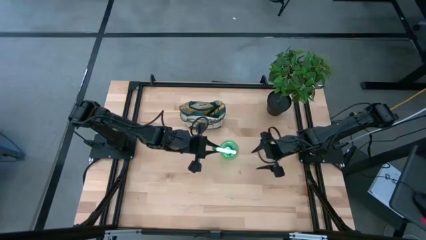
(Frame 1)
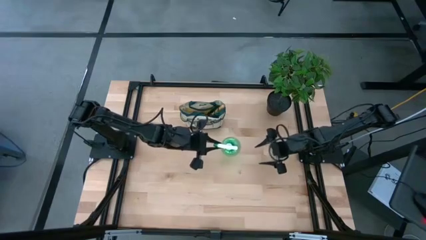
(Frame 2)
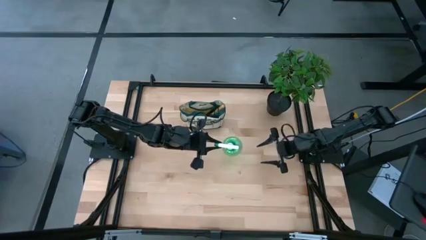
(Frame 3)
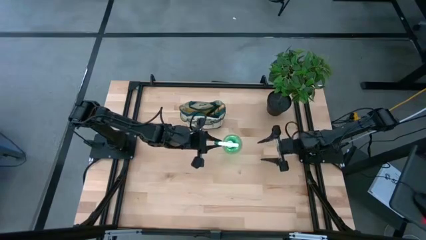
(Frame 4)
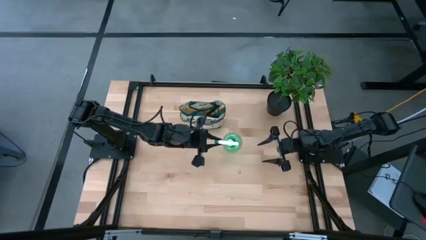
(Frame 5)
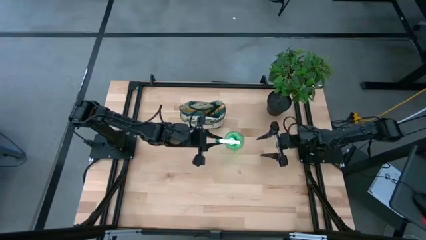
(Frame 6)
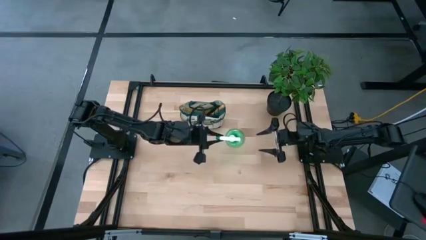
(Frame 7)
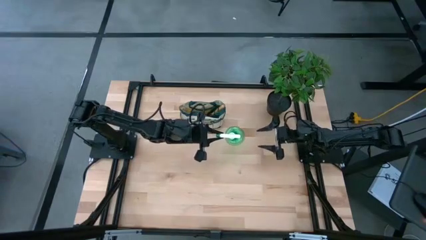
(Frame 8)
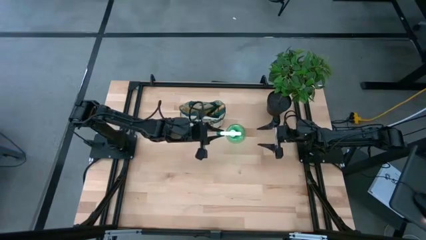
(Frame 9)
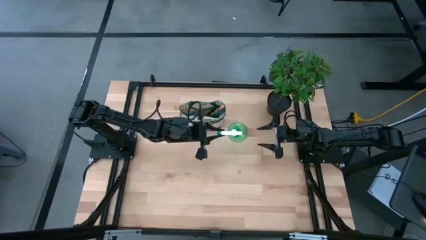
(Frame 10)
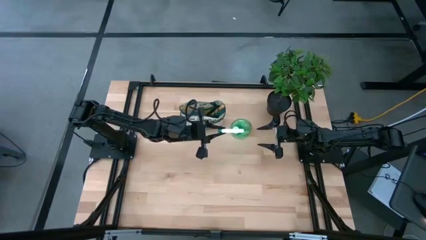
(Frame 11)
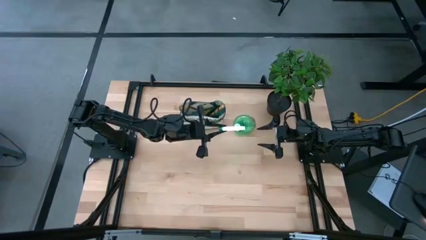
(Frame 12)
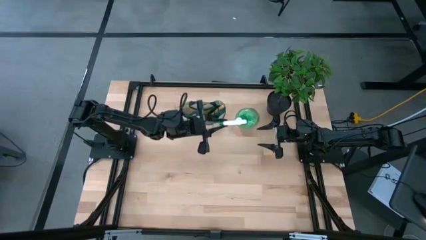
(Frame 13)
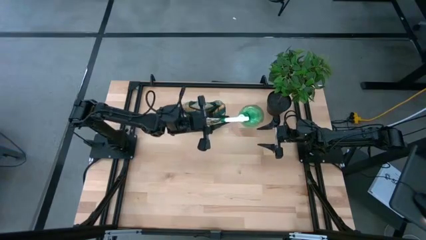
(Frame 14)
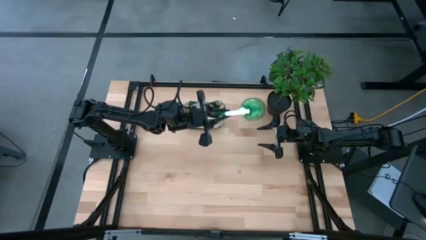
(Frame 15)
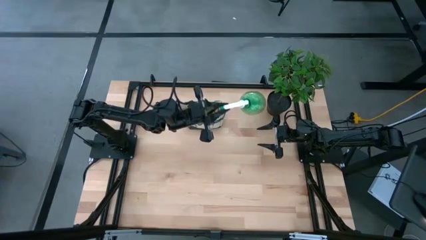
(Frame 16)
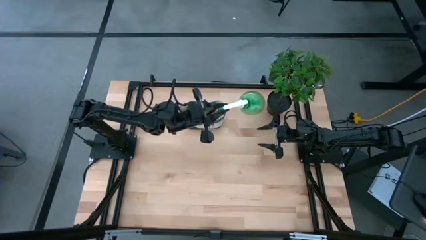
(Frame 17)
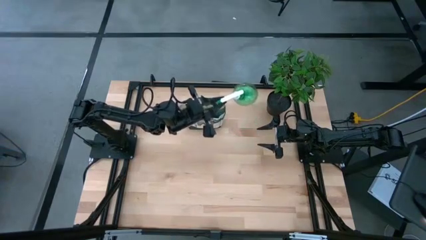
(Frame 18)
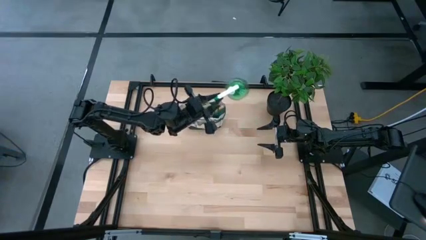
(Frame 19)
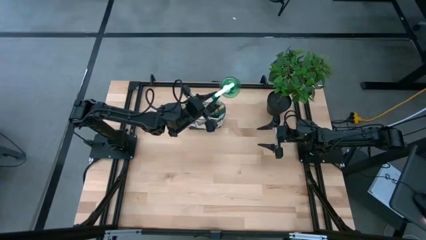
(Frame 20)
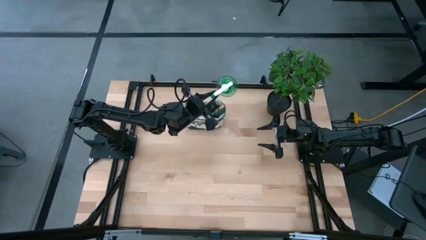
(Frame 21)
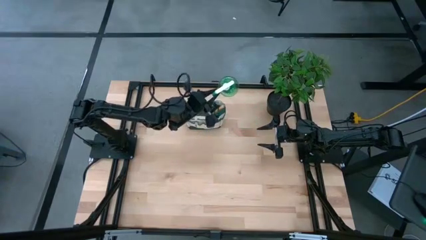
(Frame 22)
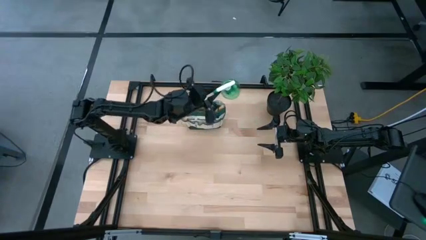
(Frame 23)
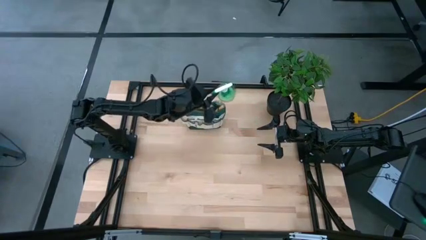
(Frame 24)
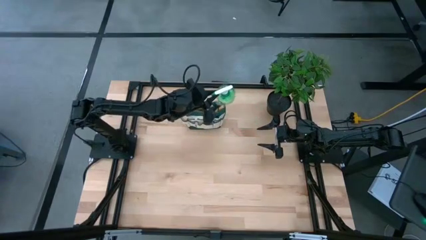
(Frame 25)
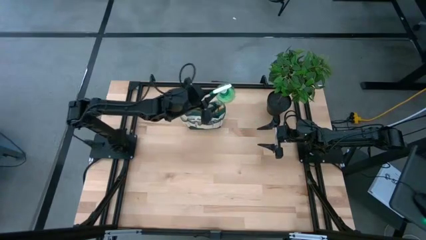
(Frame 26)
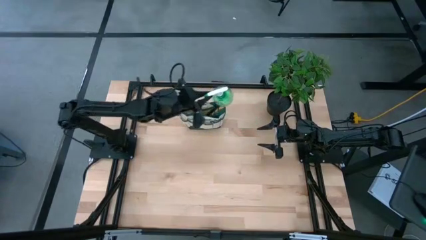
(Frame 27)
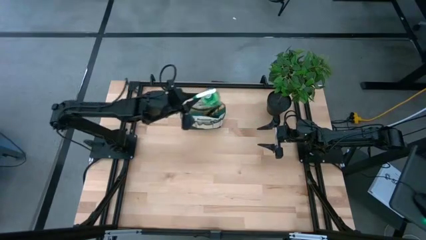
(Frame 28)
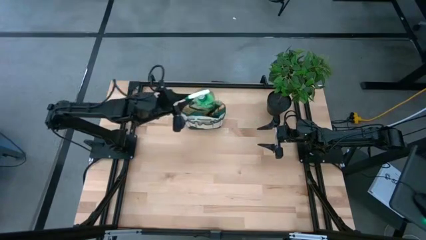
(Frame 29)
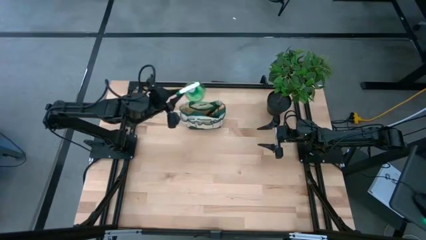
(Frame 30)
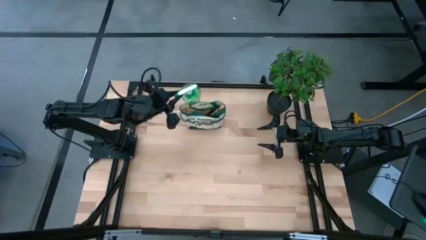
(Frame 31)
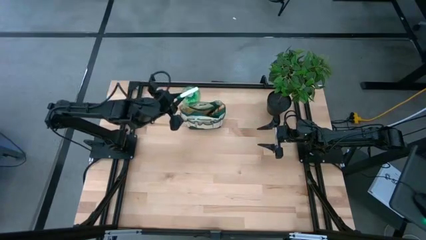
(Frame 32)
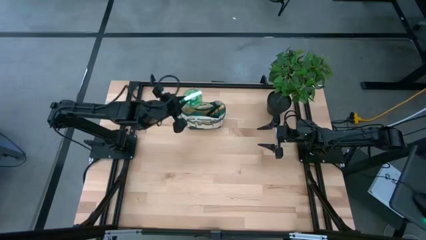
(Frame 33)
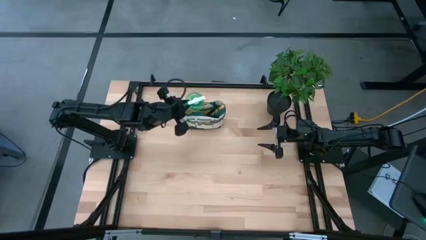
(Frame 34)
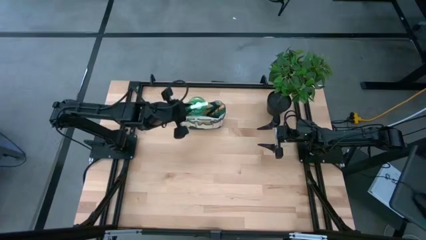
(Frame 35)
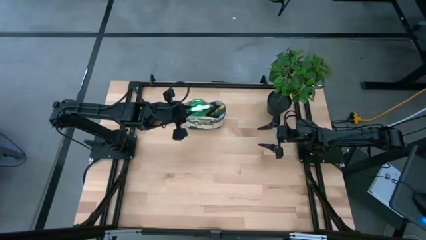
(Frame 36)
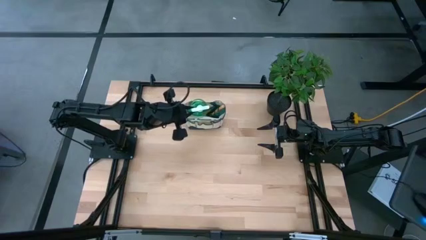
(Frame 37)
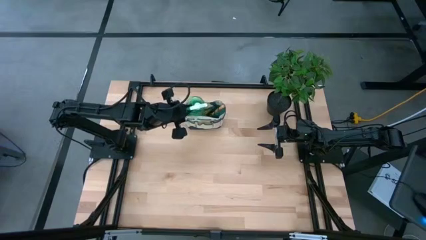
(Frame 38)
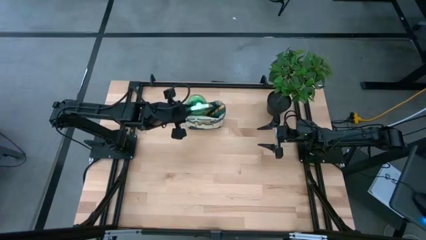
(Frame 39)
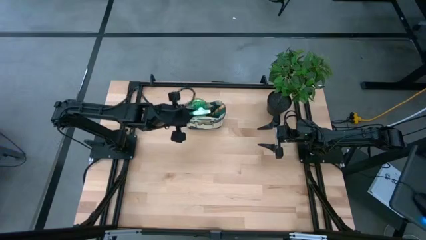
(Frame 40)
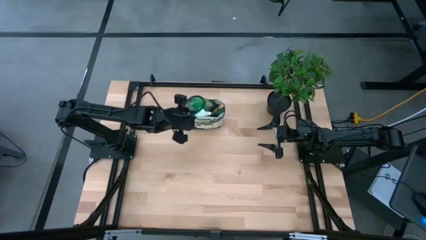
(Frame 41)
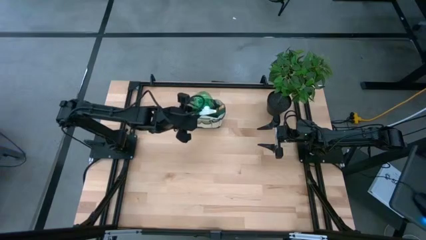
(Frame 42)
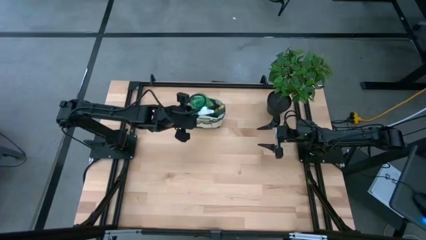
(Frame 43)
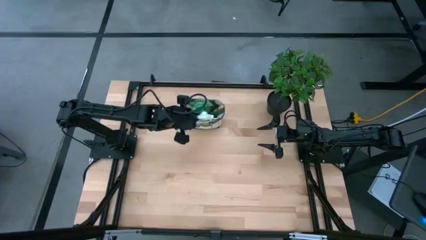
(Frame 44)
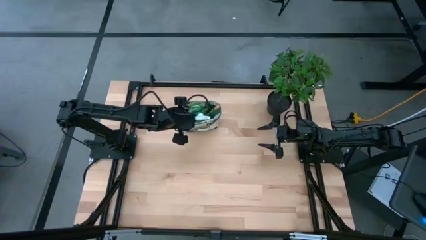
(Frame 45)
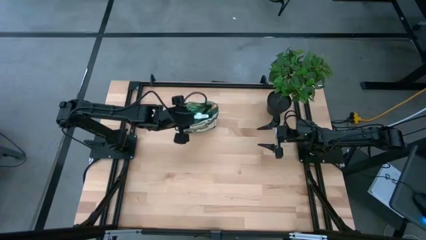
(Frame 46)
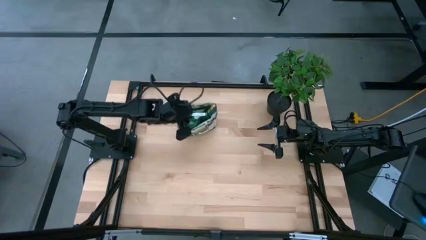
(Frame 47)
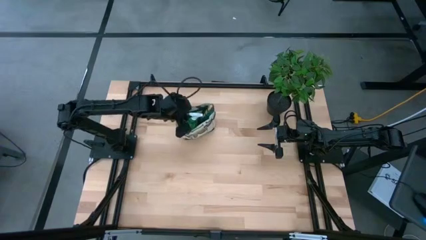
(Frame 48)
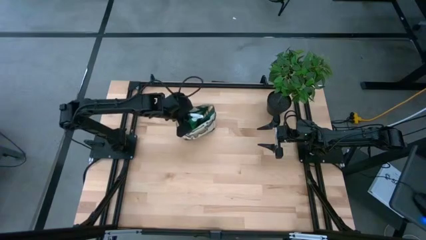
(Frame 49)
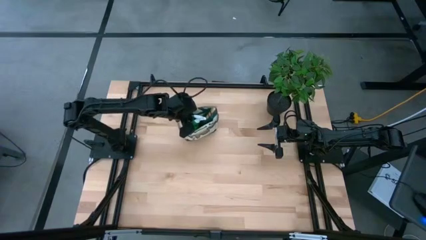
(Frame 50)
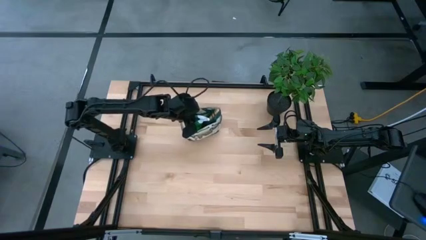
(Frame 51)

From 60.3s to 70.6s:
Task: Pick & Place Garden tools in Gardening bag
Put the green spray bottle into the light brown gardening bag

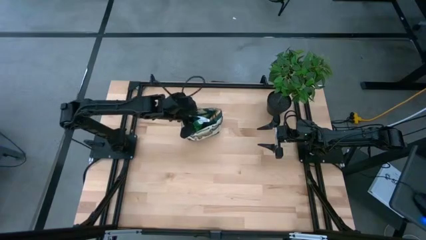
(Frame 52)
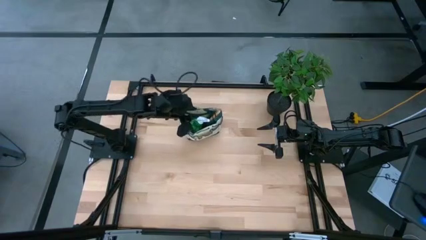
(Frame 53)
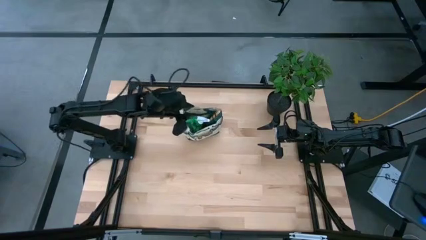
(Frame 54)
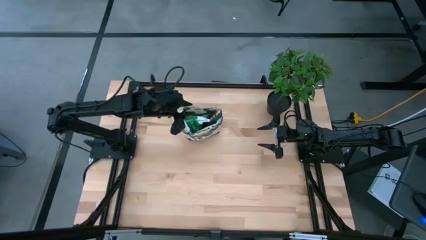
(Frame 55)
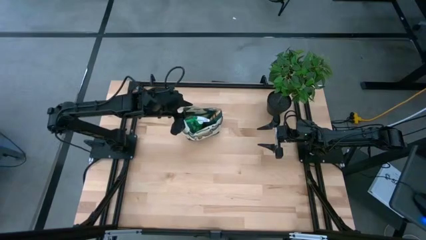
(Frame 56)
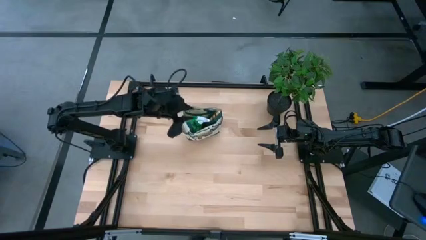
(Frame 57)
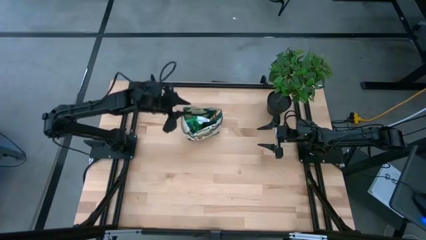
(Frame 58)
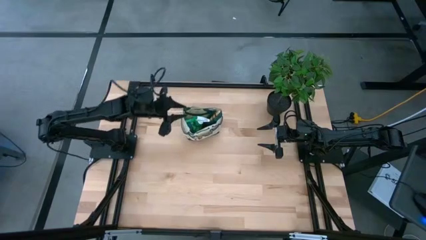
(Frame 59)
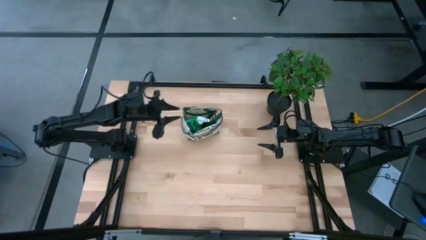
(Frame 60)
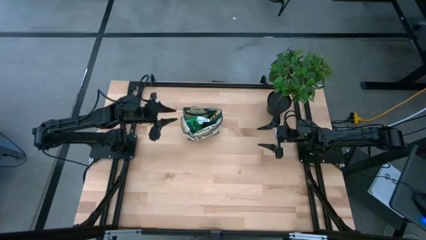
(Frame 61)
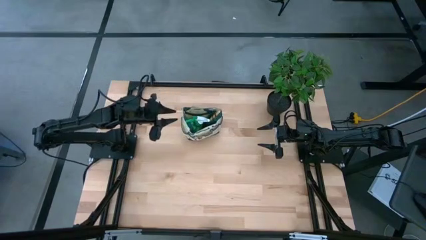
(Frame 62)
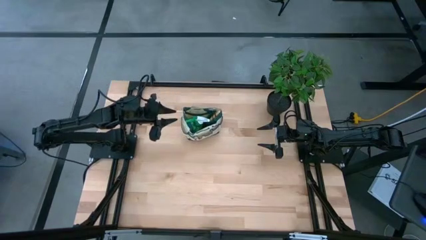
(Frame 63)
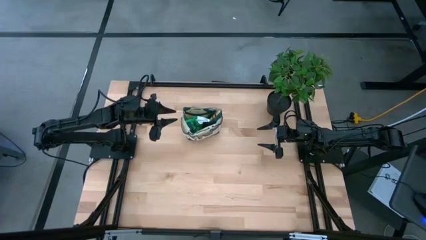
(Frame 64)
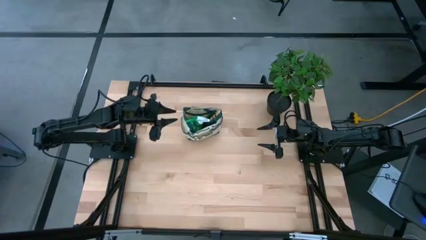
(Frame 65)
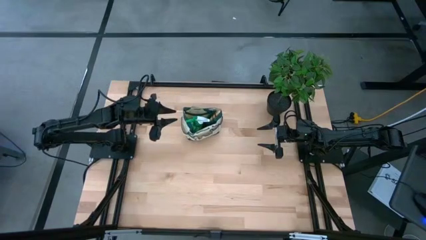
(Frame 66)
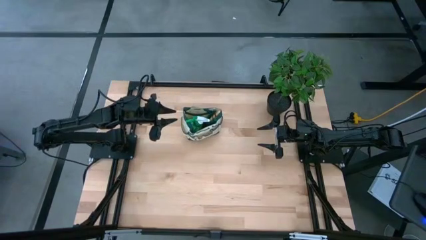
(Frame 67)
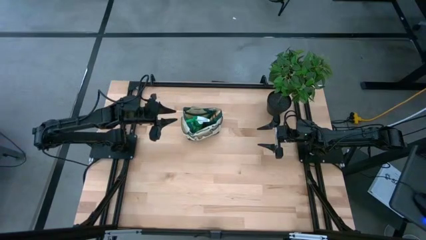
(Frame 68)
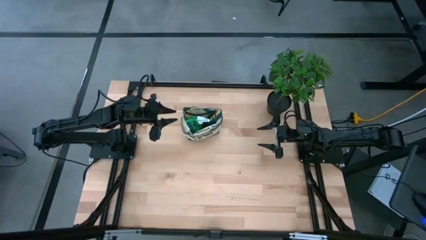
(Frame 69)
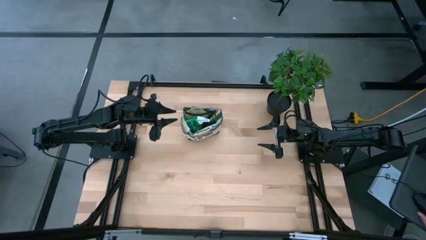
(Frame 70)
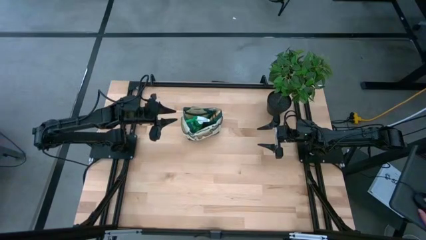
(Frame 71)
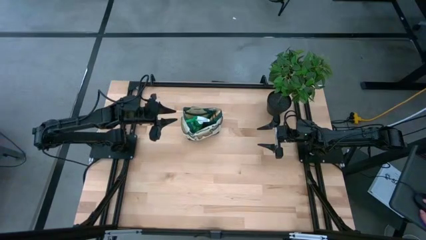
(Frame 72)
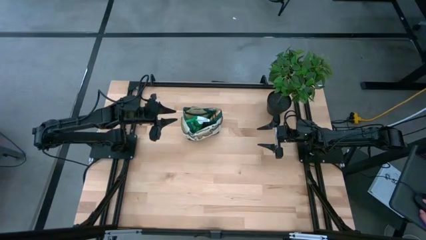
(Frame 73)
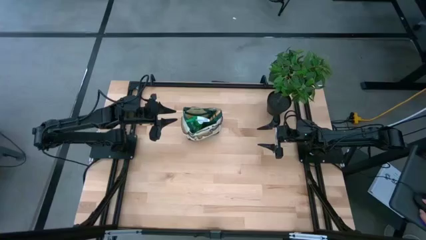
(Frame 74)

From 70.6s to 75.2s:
Return to Home Position
